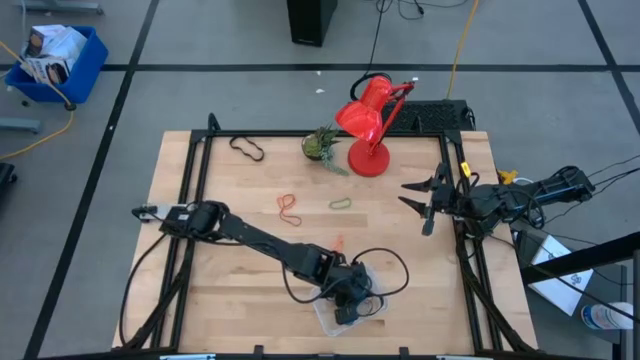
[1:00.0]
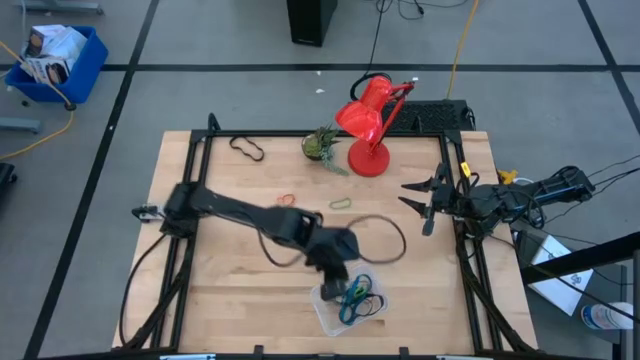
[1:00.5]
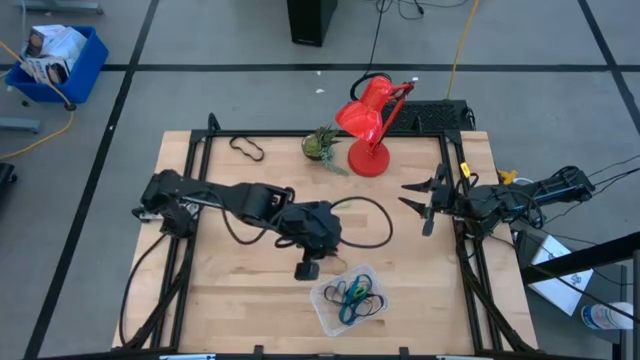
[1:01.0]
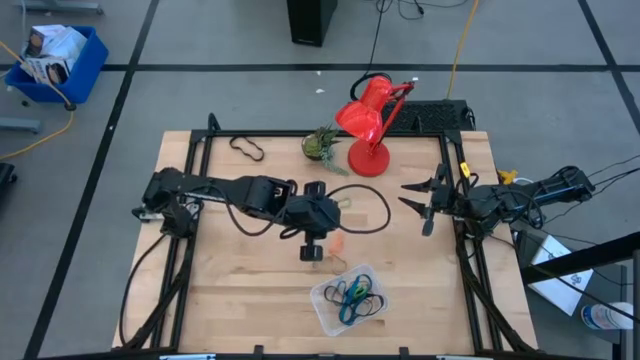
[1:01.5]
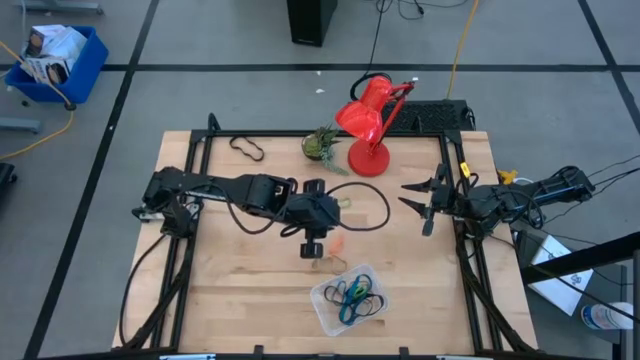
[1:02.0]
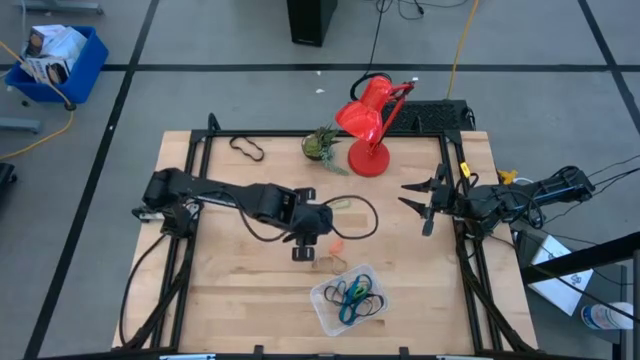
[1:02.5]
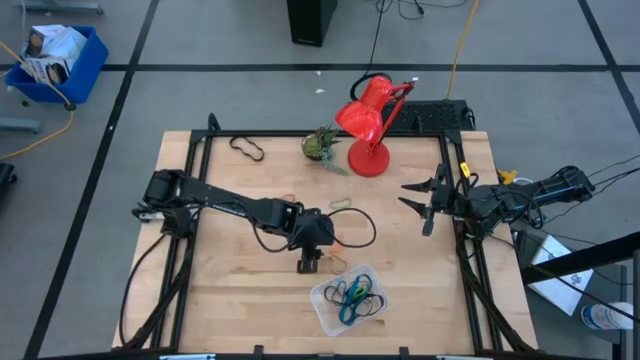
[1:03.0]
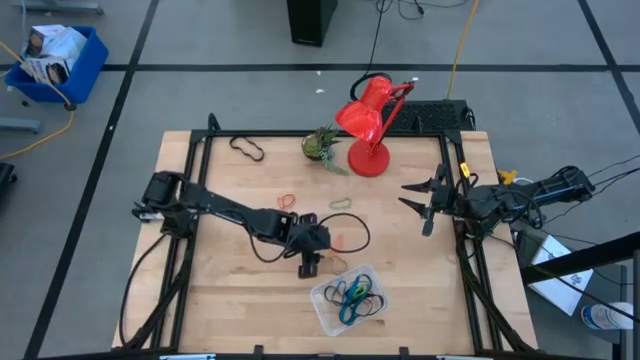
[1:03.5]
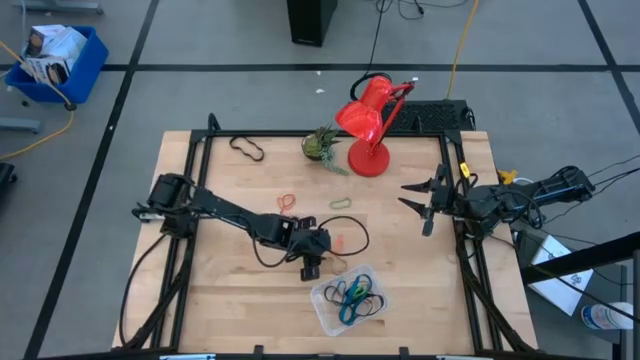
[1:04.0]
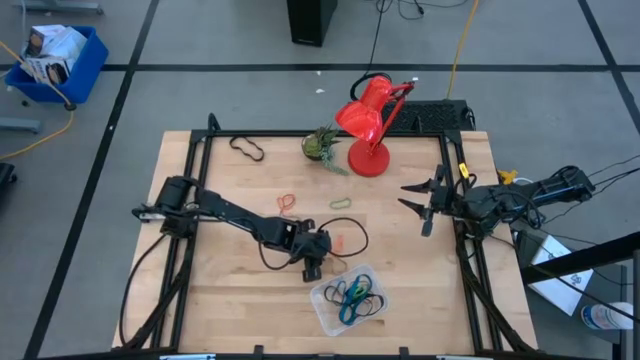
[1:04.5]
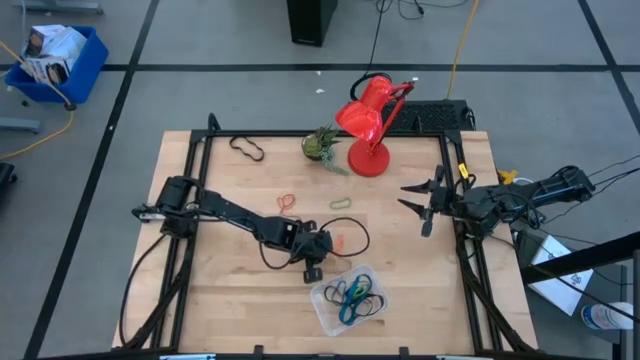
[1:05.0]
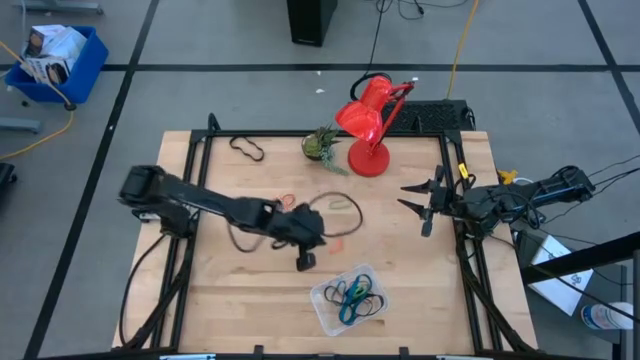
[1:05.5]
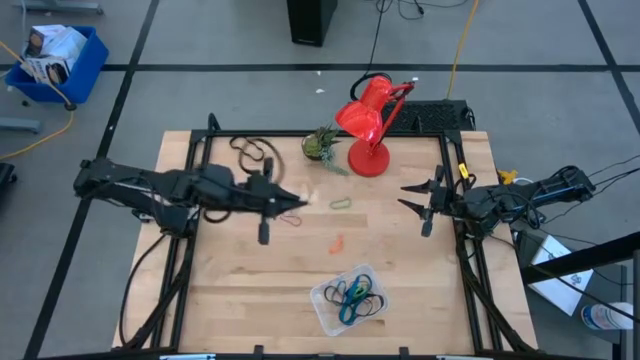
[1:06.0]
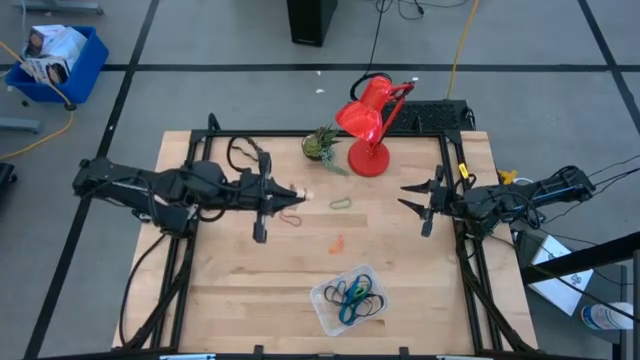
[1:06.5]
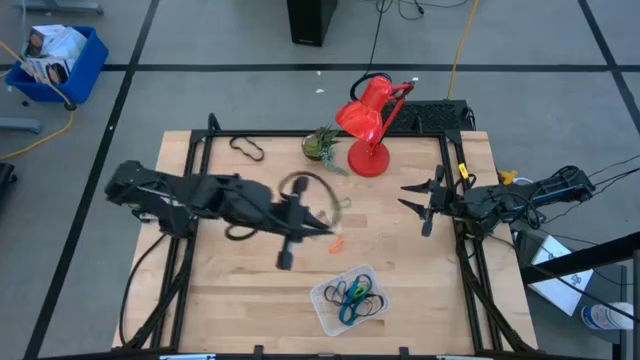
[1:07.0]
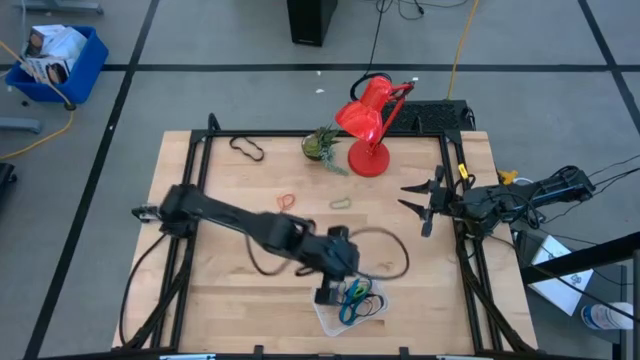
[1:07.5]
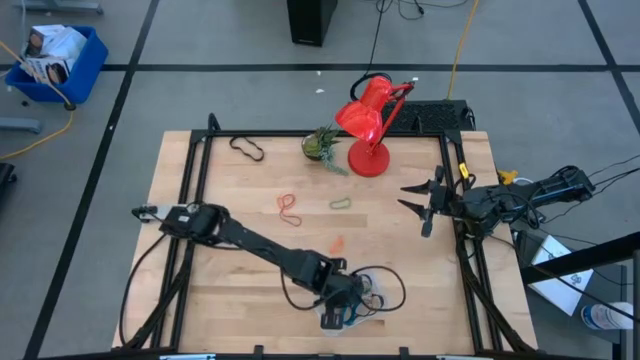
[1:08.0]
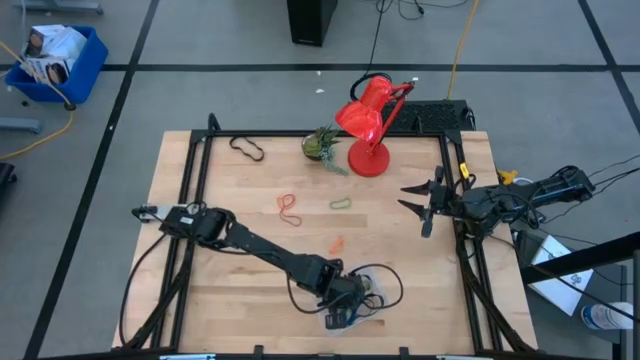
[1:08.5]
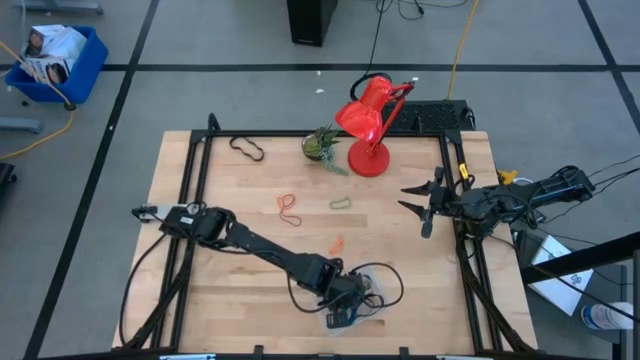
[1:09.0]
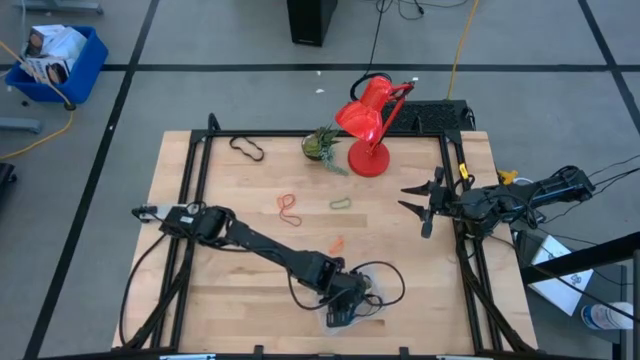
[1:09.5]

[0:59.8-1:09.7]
Task: Pick and place rubber bands into bin
Put the brown rubber band into the transparent container

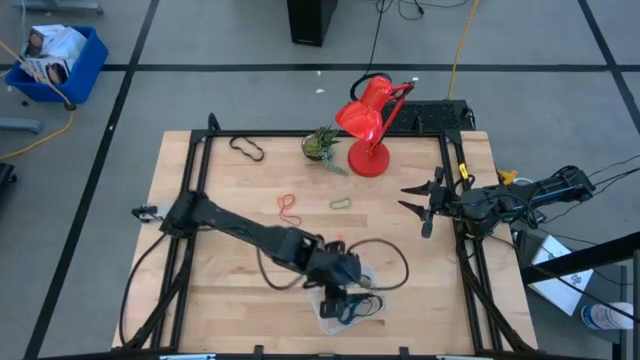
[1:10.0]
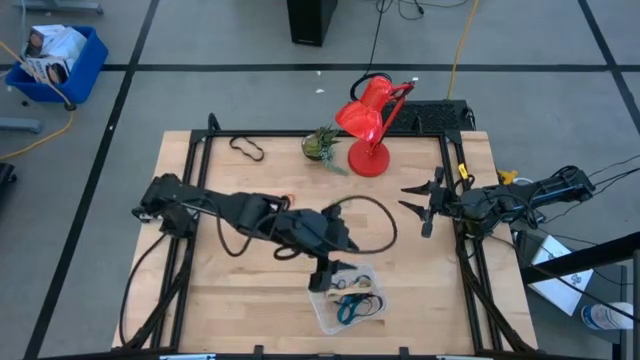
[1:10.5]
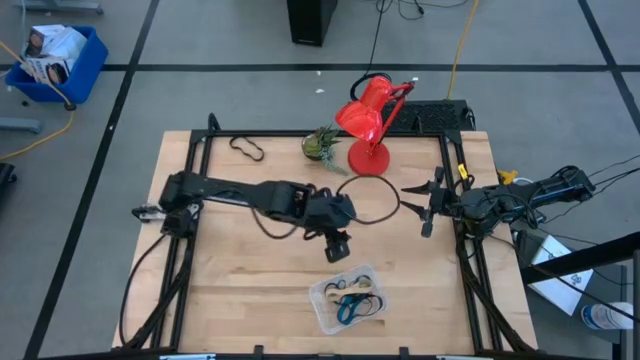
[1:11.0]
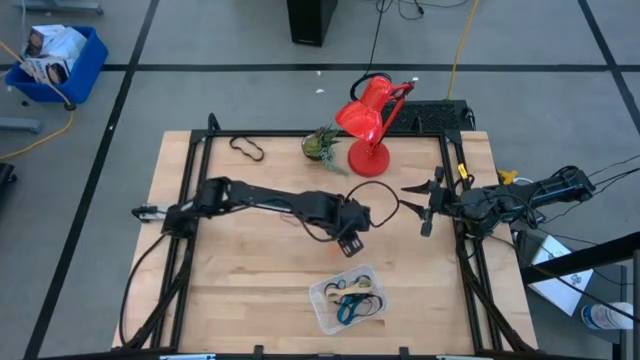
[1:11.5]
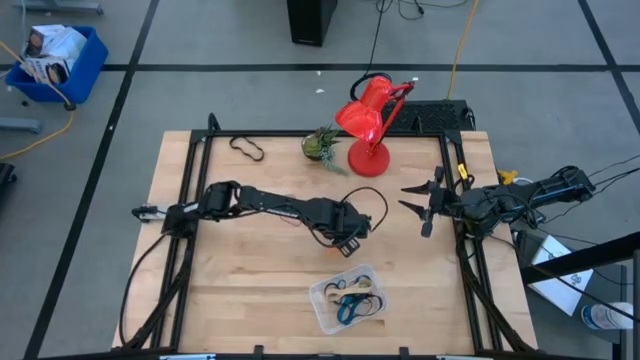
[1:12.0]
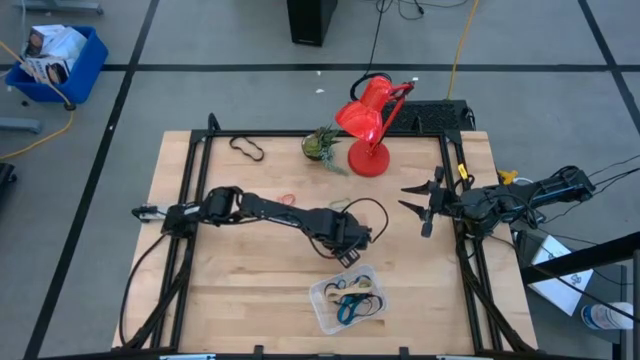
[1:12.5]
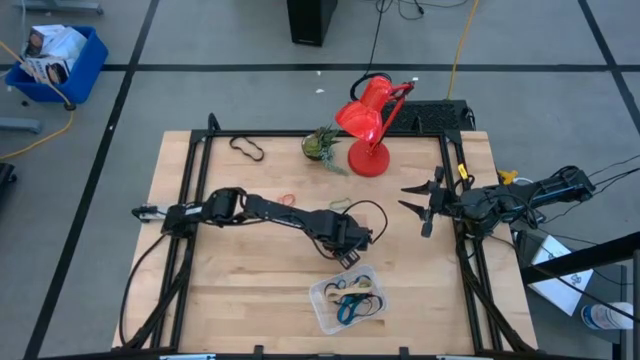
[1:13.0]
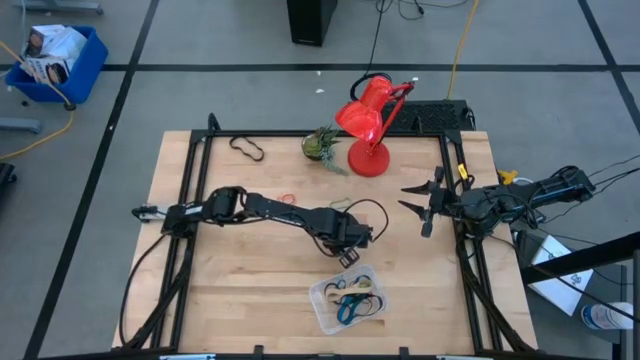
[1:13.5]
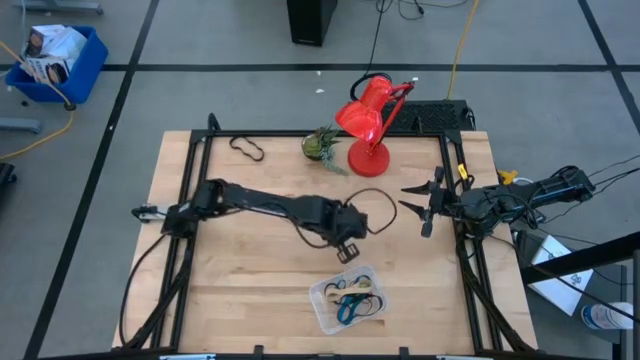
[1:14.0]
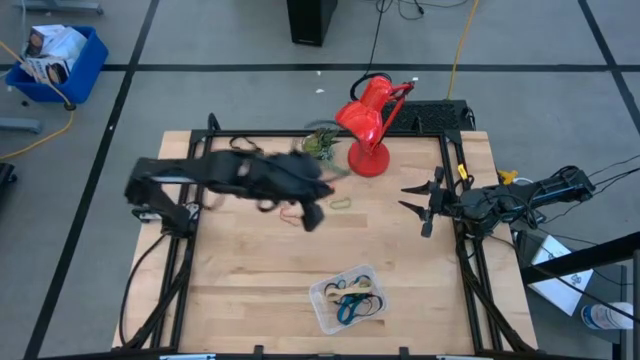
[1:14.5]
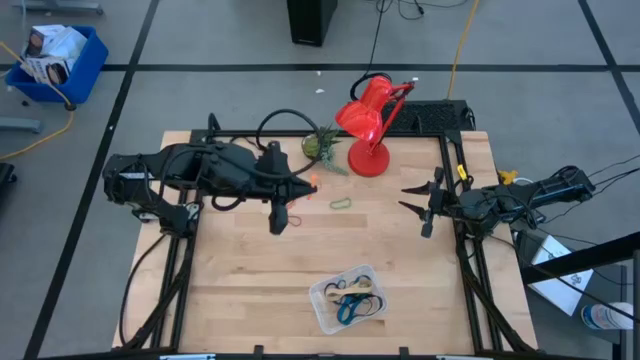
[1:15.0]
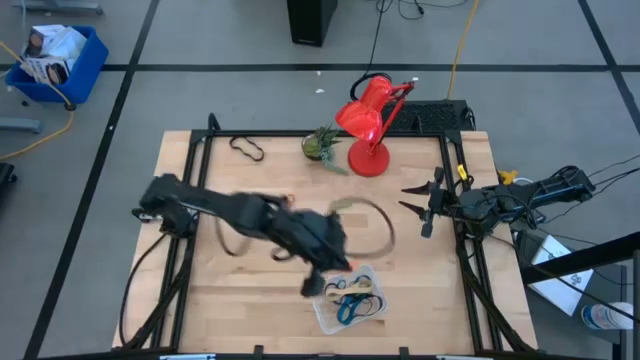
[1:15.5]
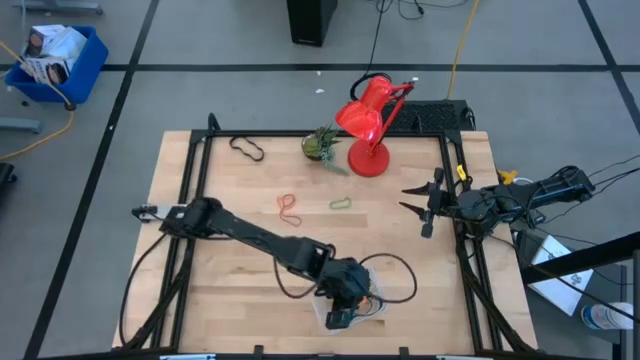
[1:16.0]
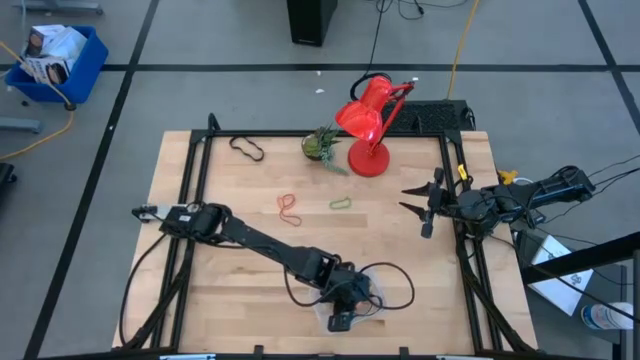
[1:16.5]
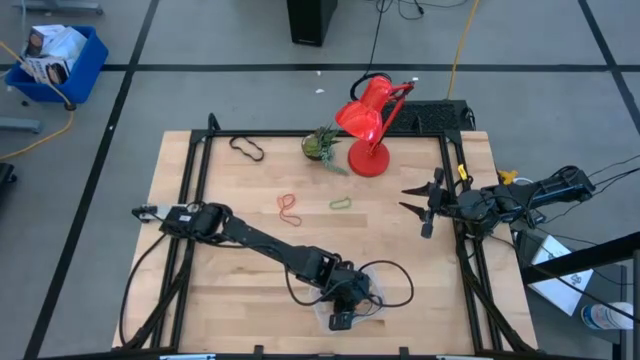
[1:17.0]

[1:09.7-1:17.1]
Put the orange rubber band into the transparent container

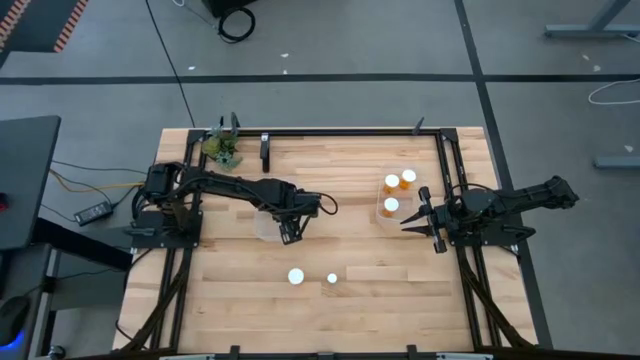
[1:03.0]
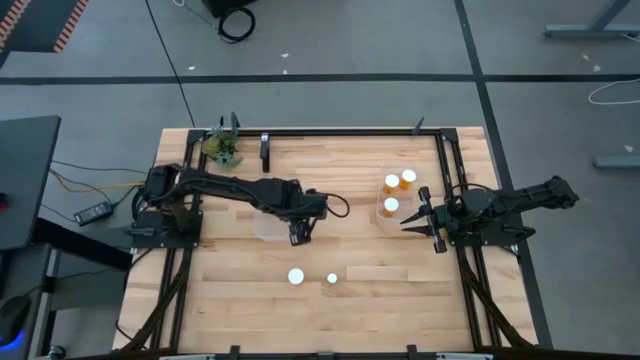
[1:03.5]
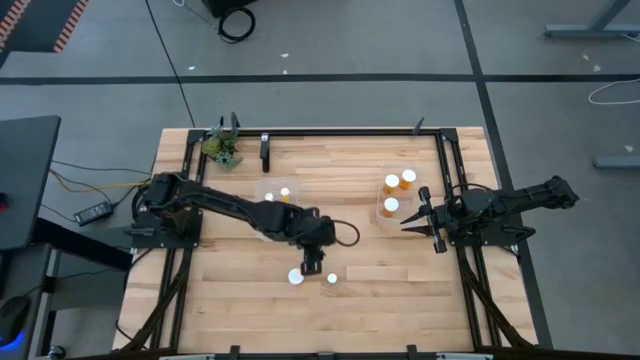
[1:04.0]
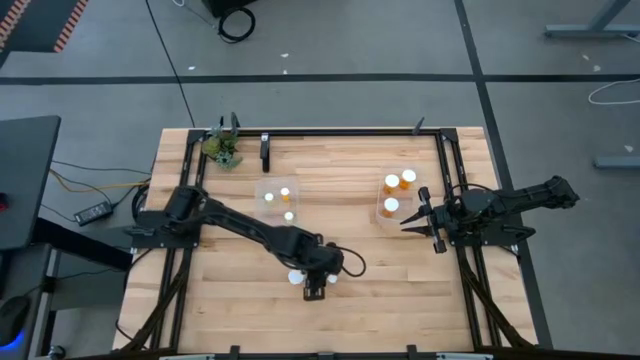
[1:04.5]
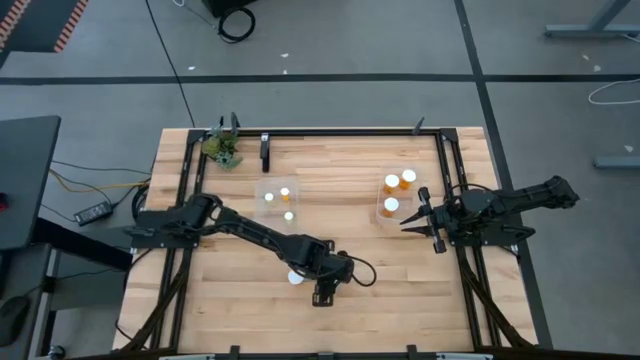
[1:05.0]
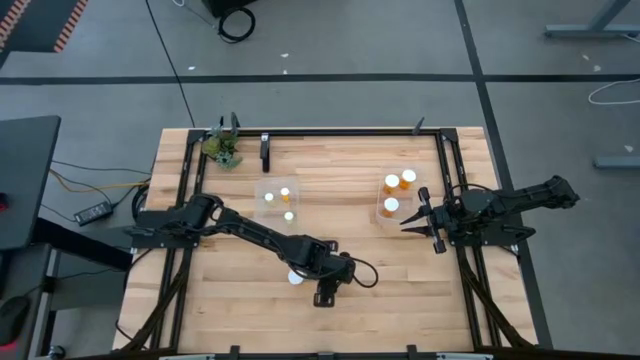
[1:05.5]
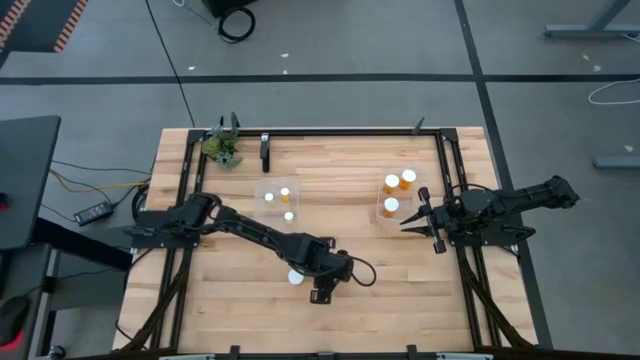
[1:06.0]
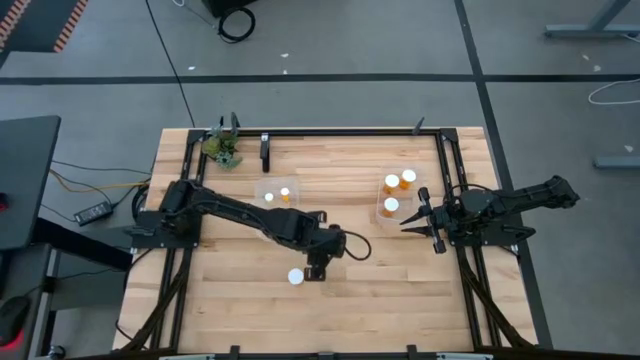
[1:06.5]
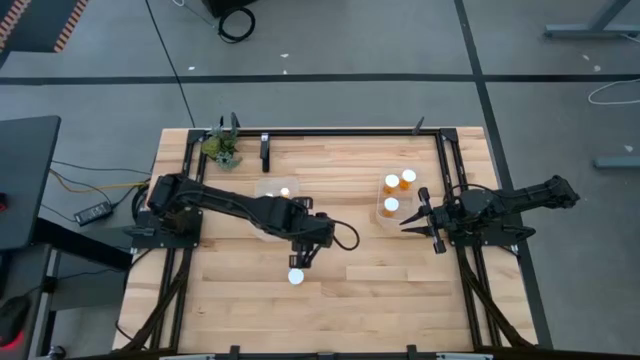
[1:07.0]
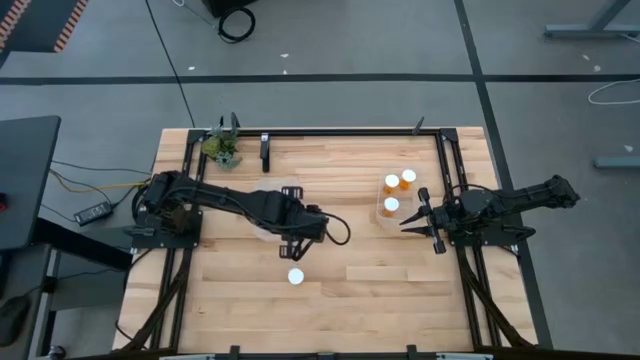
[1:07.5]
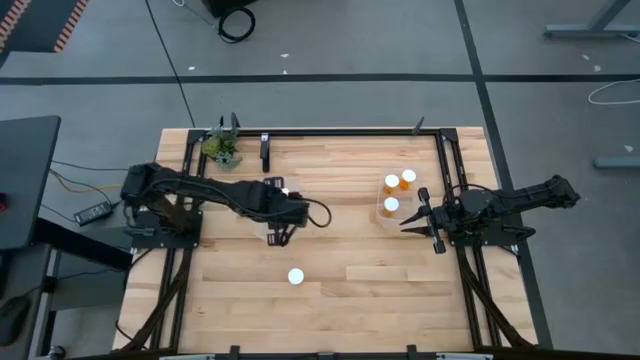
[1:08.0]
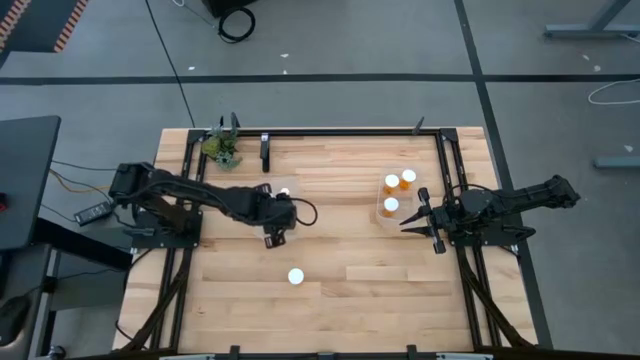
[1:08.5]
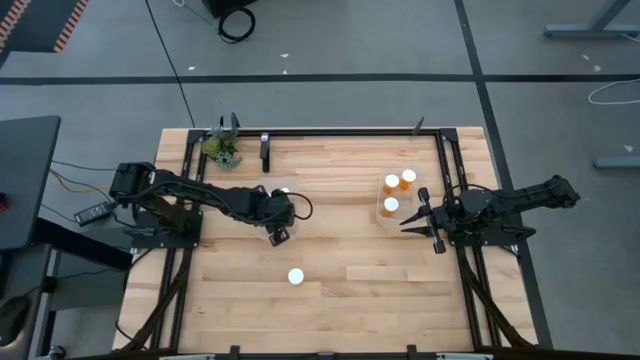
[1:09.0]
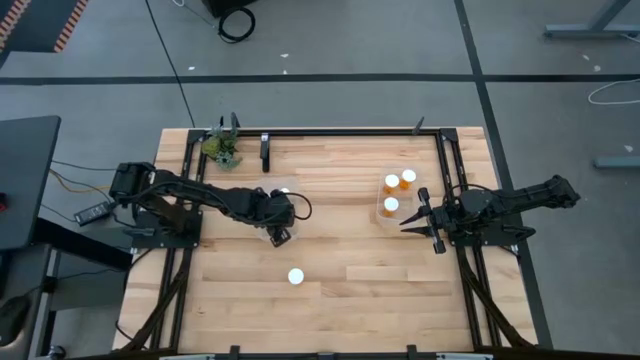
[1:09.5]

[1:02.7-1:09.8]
Task: Pick and place medicine bottles into bin by pill shape (circle, oval)
Put the small yellow pill bottle into the left transparent bin
